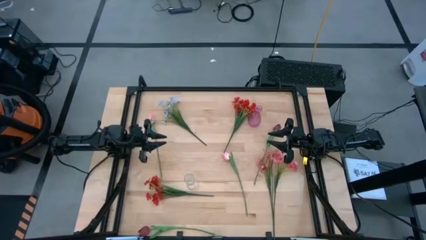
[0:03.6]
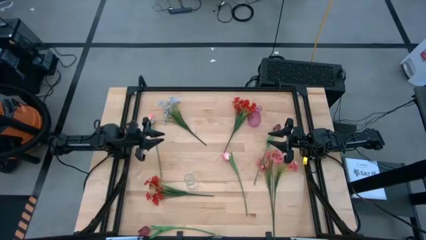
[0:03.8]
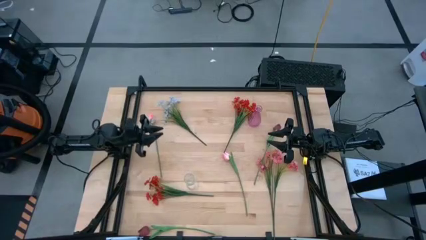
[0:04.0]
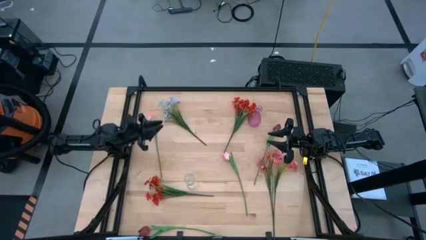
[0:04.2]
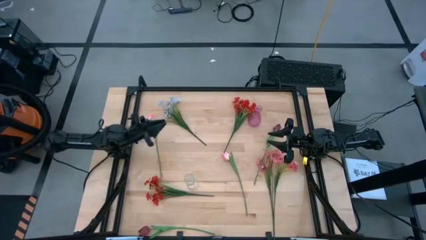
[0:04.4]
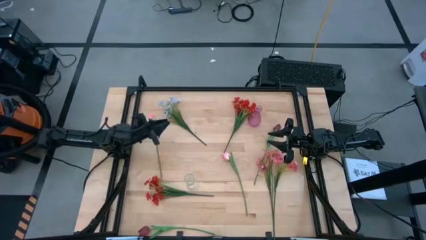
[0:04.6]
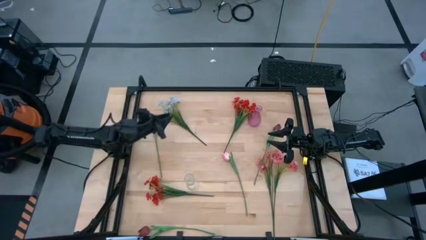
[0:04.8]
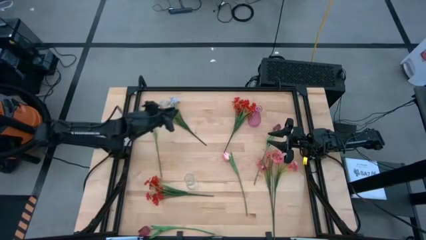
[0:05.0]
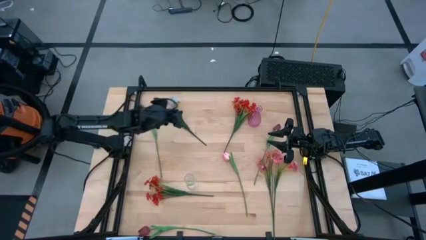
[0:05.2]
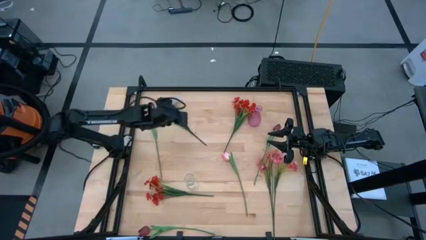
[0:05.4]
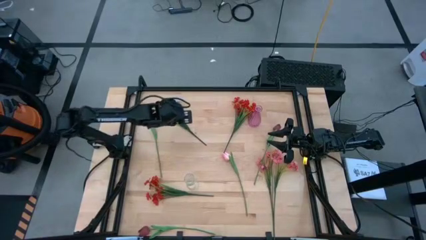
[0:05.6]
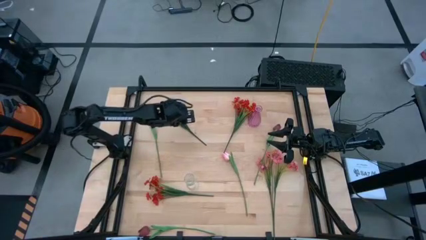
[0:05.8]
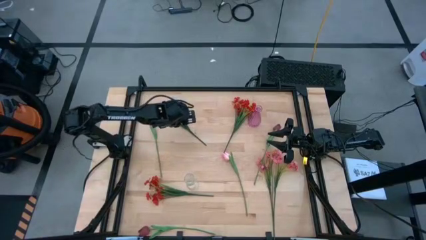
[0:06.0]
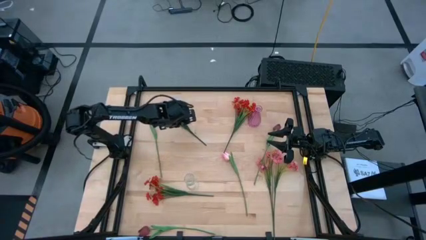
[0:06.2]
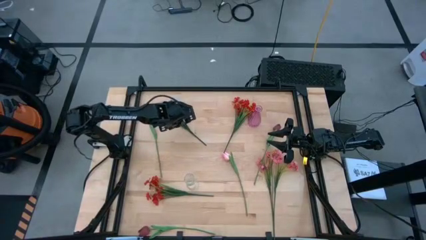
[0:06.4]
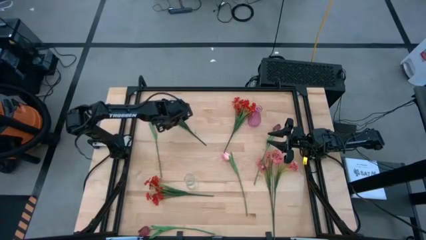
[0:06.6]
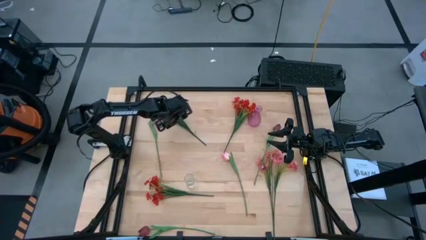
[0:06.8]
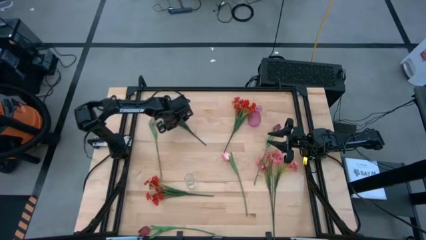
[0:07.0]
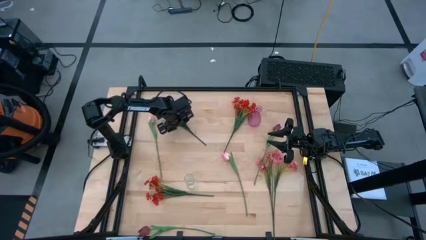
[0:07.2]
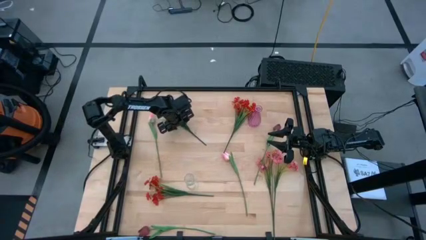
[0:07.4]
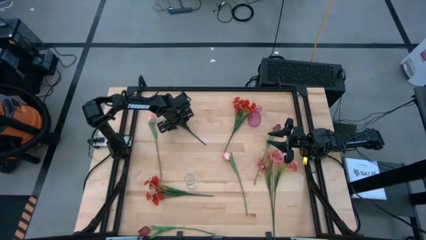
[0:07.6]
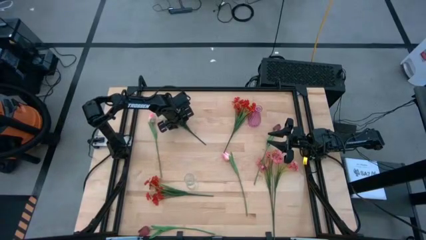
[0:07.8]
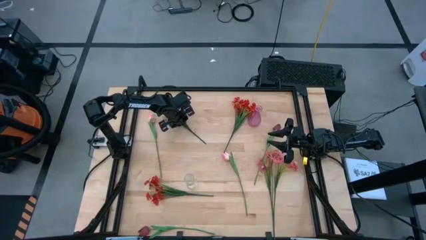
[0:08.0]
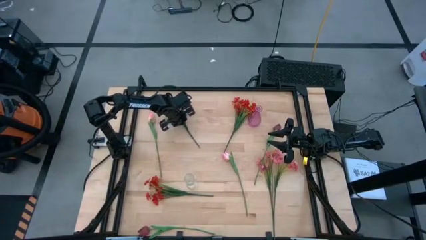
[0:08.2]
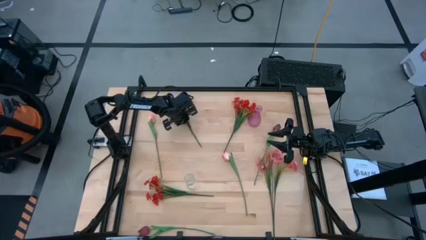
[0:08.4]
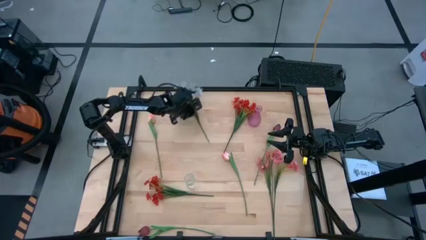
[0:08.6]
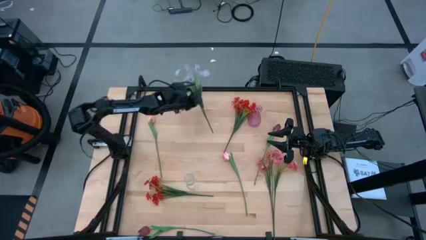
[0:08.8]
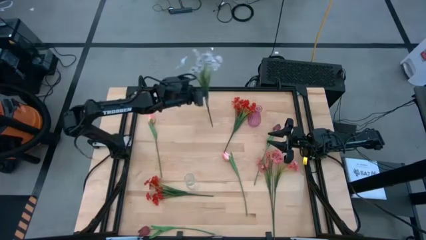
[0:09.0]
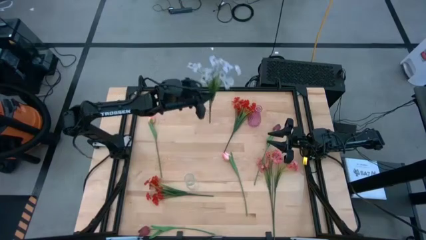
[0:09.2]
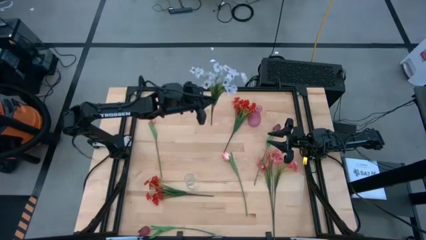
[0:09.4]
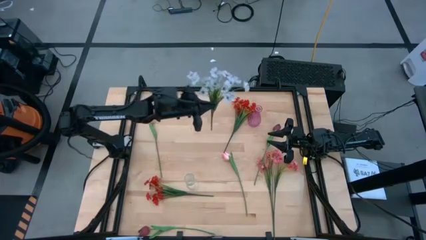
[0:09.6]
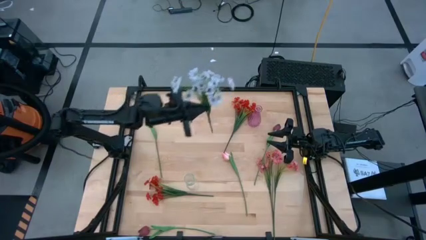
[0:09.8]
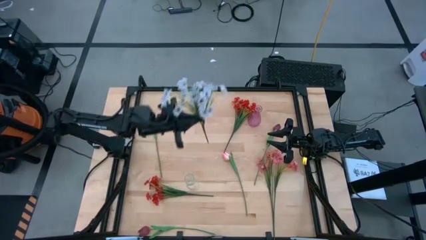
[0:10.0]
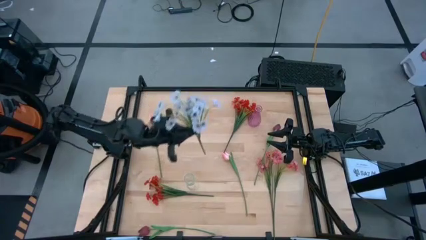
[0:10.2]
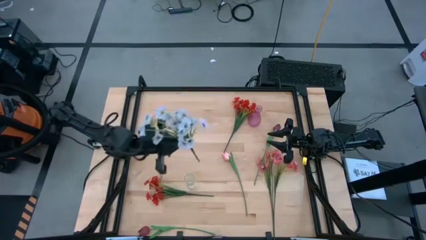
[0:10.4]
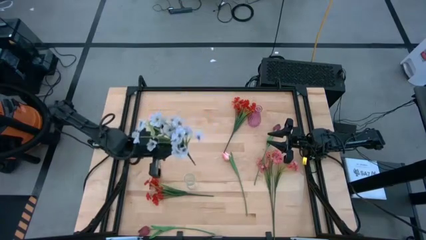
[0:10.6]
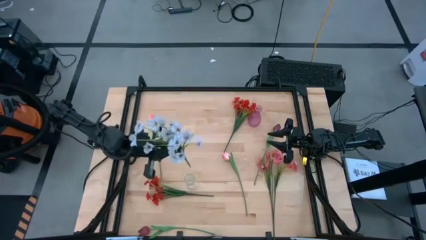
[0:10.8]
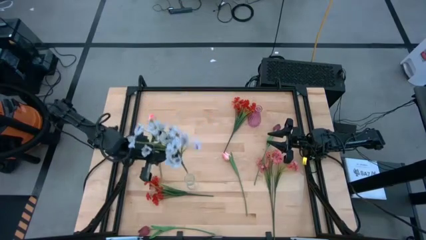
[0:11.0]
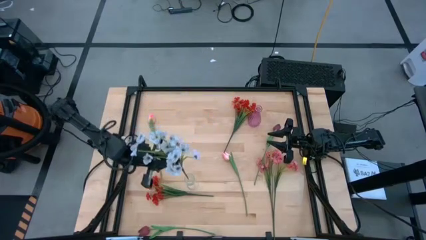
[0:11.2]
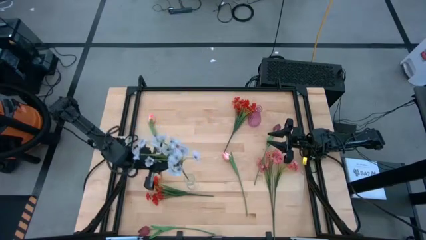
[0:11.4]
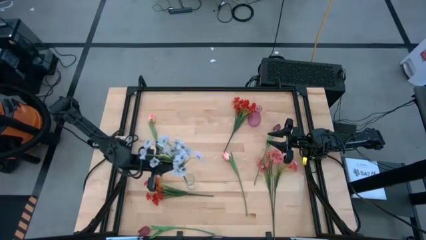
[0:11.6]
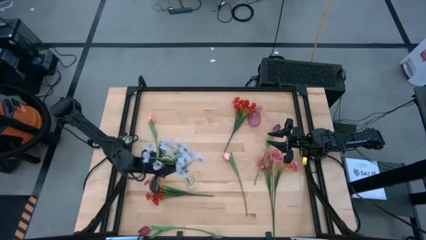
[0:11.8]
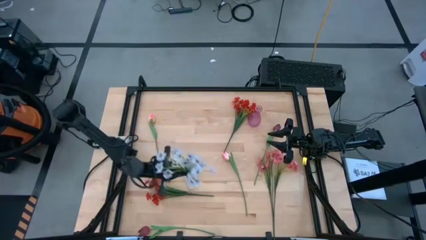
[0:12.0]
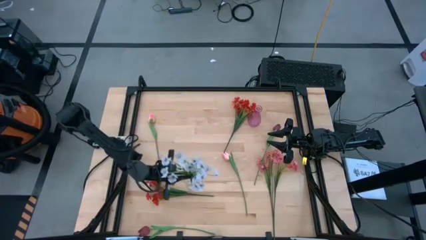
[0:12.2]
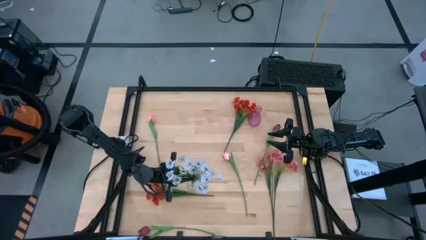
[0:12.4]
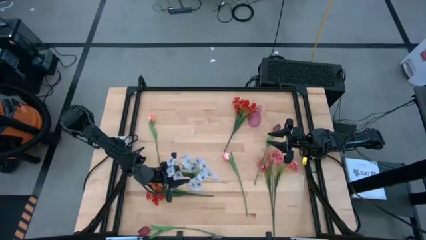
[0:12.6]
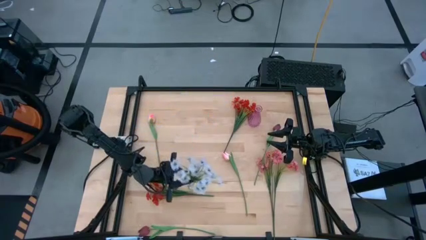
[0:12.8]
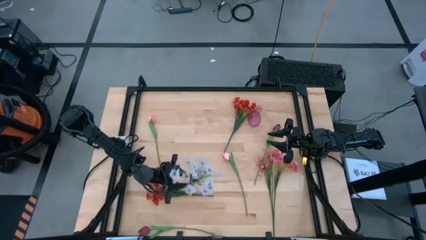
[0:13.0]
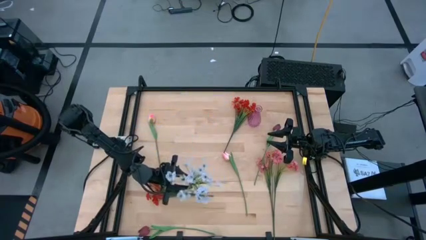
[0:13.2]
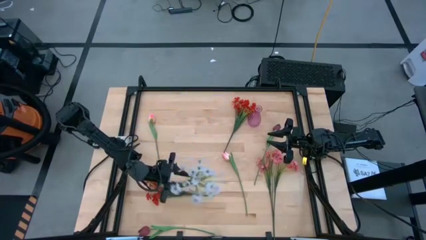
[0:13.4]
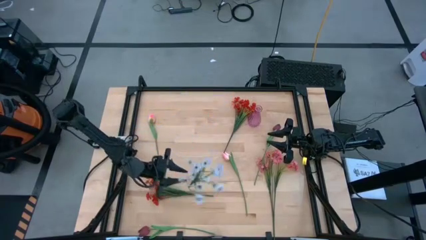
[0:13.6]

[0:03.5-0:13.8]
Task: Sort flowers into vase by color
Put the white flowers into the transparent vase

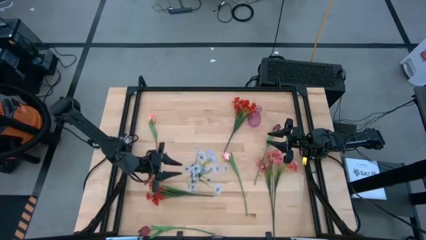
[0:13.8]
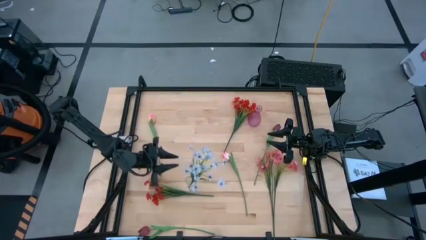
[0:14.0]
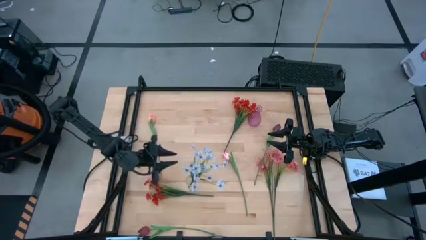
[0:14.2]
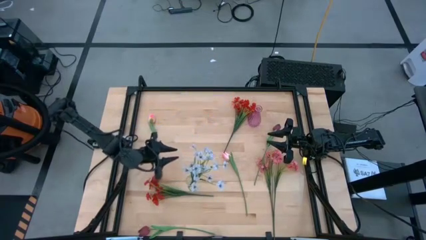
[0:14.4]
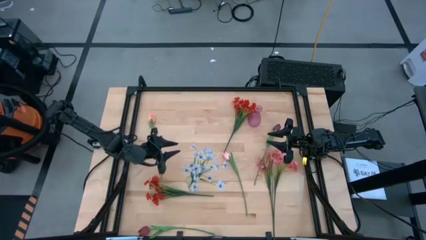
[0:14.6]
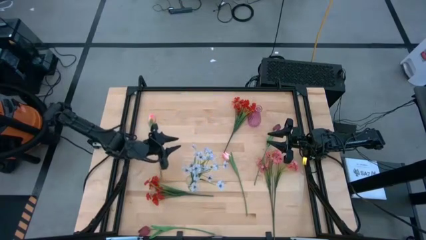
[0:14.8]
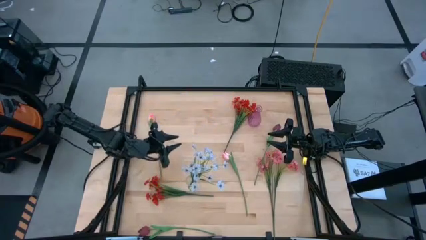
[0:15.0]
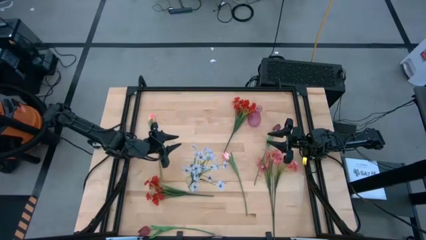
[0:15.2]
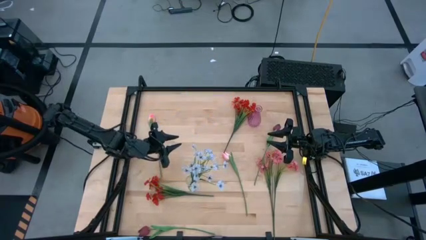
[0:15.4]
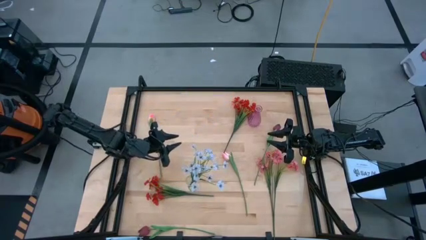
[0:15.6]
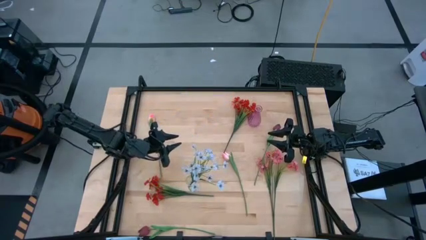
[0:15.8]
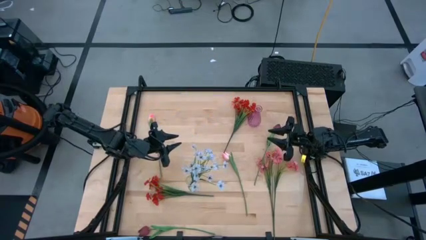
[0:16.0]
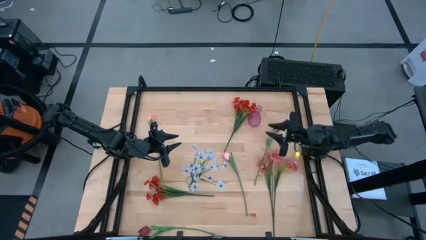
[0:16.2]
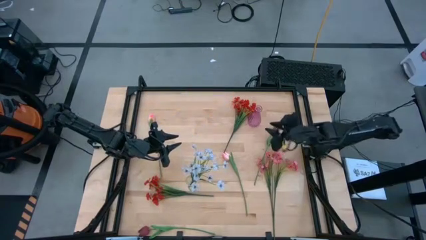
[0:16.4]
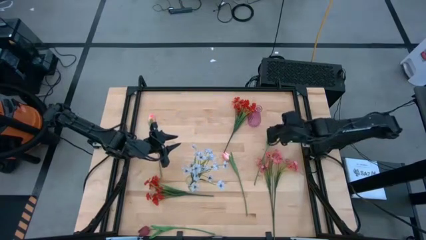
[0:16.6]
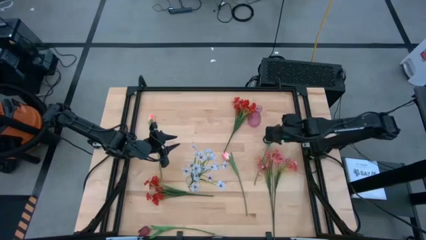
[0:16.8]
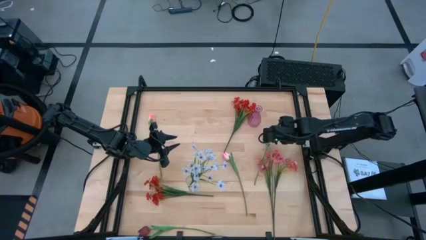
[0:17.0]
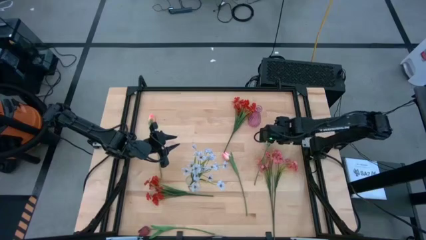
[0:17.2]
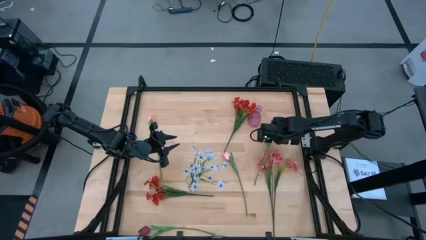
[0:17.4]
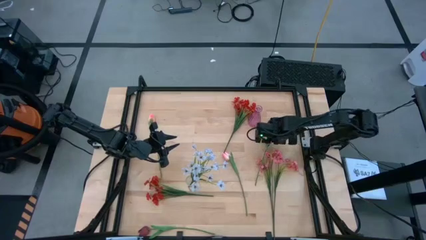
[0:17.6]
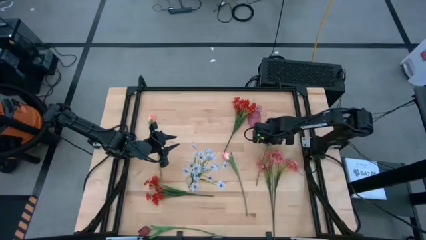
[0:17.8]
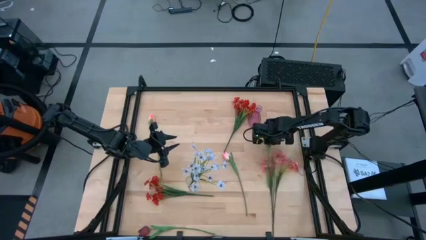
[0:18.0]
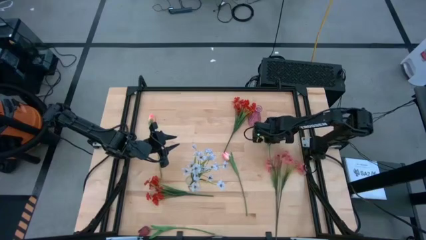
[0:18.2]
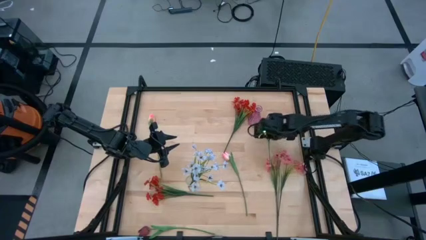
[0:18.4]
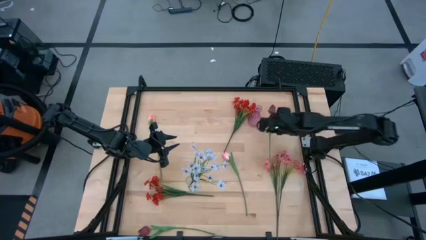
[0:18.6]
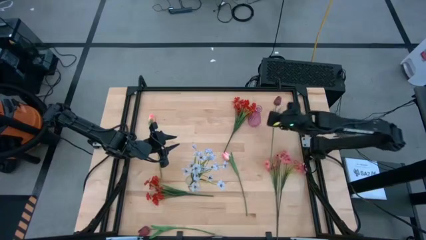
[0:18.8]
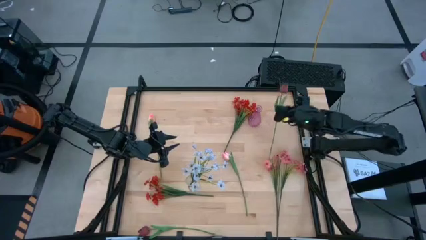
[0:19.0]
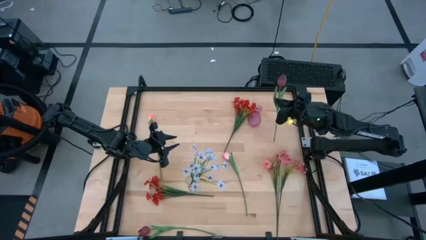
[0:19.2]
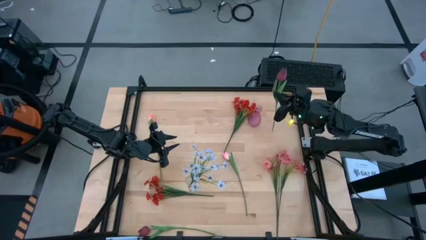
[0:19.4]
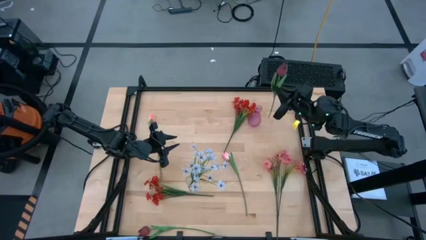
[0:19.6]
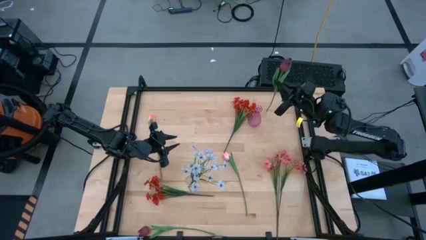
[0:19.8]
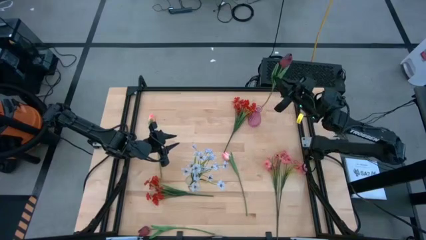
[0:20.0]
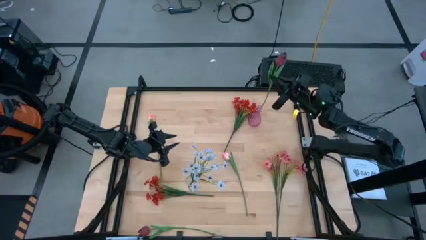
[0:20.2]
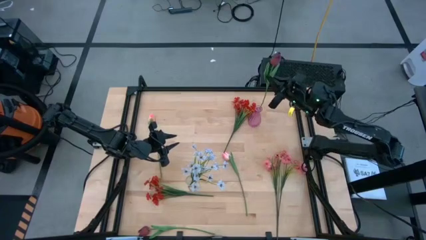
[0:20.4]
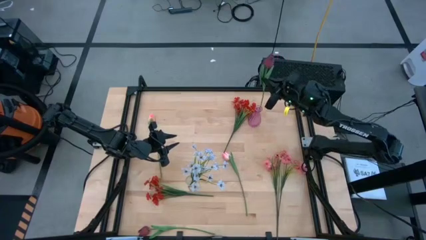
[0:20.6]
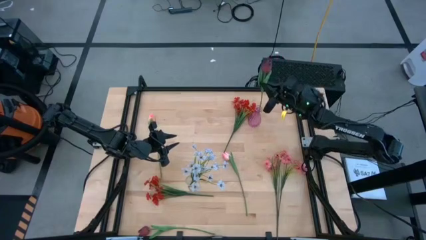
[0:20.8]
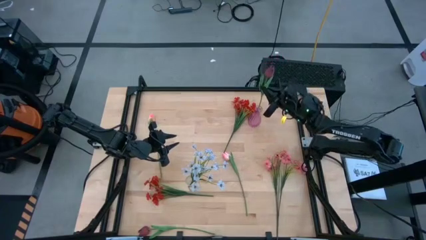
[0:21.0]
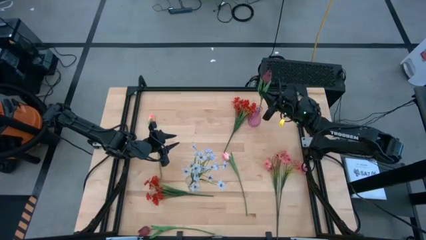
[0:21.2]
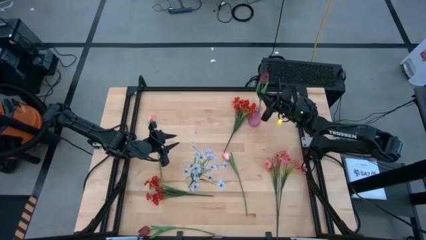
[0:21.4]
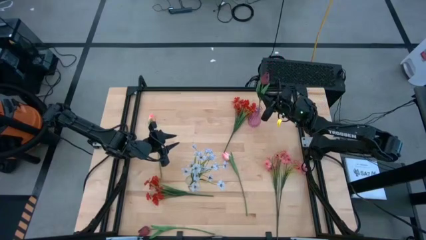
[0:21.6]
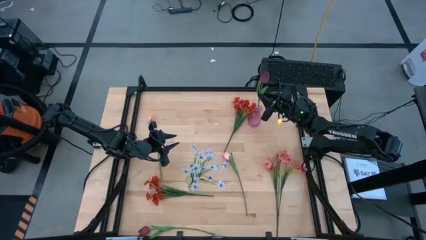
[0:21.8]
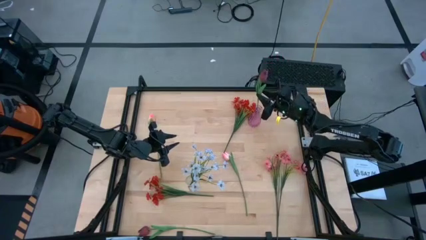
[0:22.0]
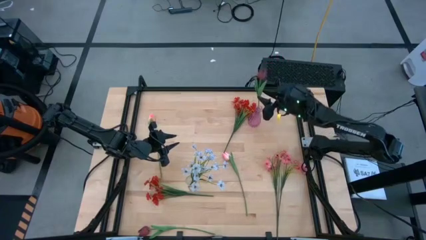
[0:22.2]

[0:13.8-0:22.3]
Put the top red flower into the purple vase
